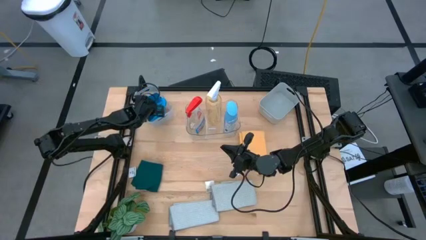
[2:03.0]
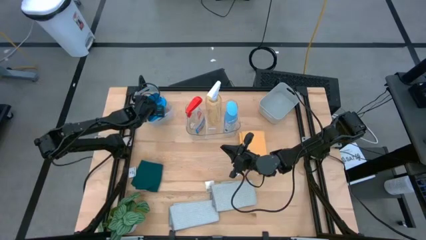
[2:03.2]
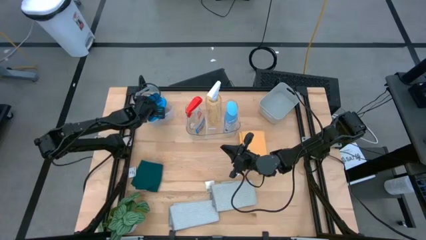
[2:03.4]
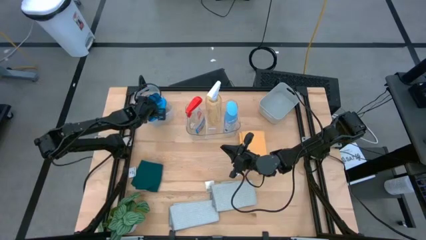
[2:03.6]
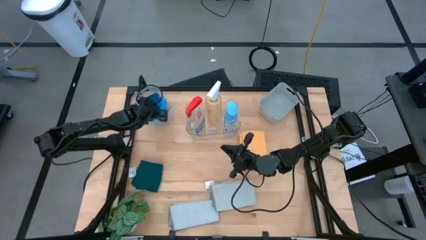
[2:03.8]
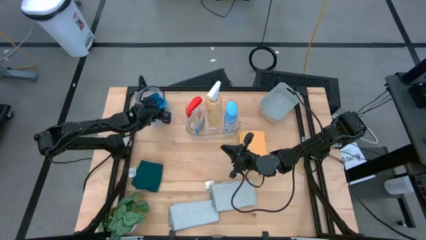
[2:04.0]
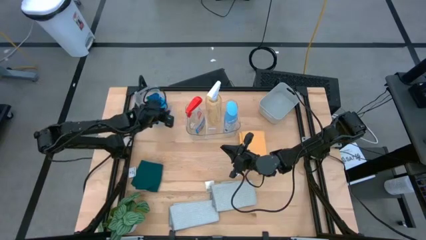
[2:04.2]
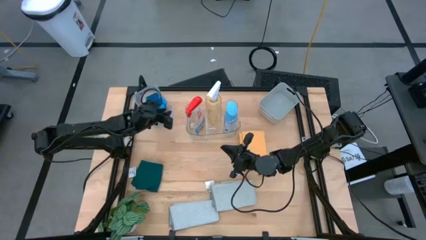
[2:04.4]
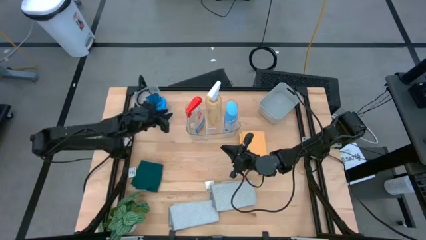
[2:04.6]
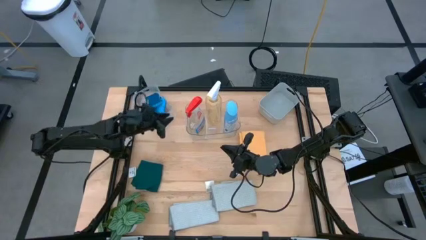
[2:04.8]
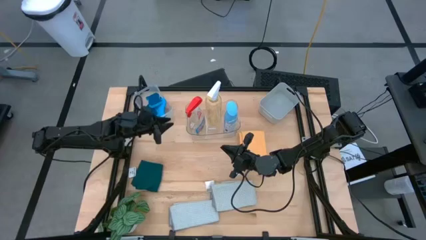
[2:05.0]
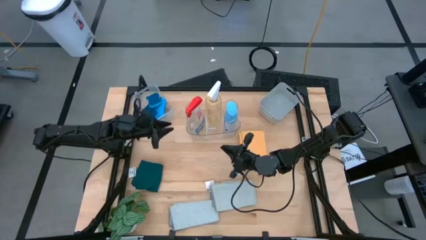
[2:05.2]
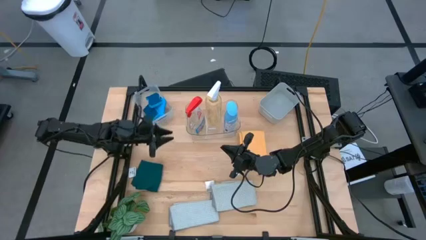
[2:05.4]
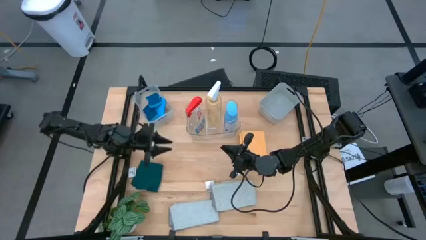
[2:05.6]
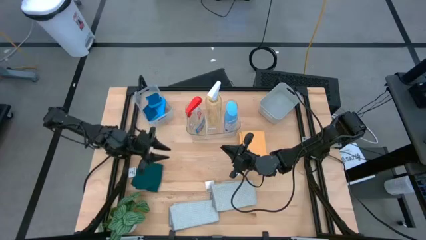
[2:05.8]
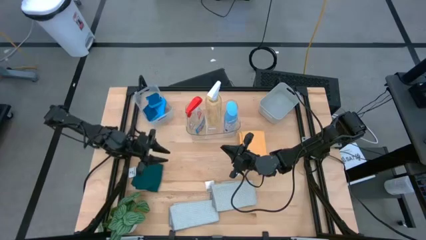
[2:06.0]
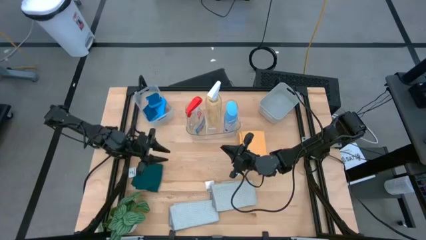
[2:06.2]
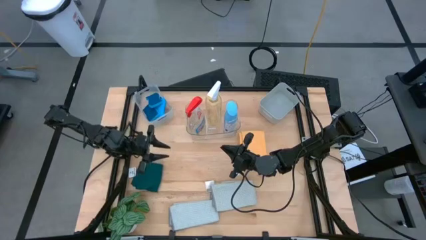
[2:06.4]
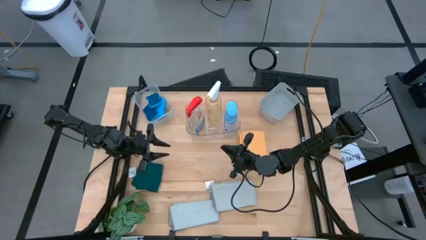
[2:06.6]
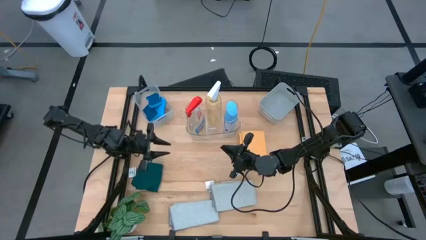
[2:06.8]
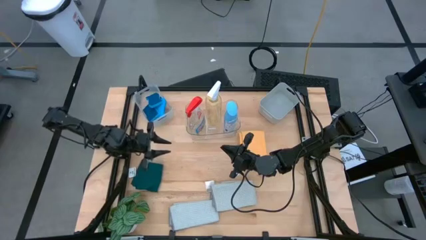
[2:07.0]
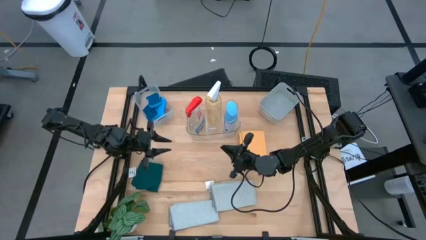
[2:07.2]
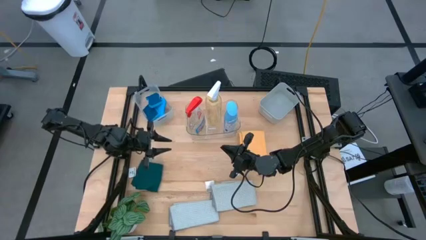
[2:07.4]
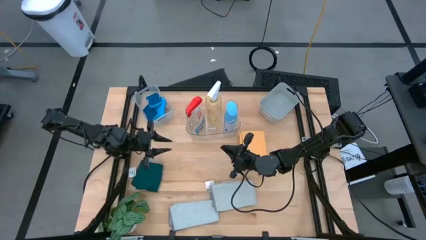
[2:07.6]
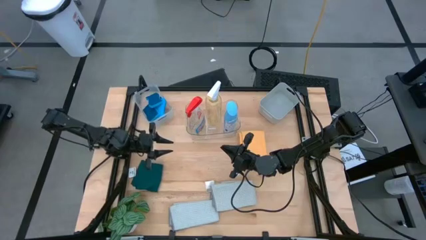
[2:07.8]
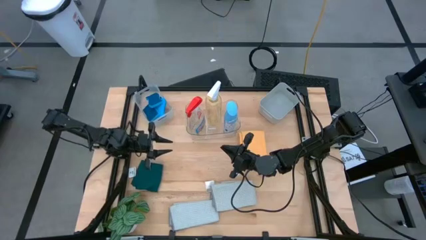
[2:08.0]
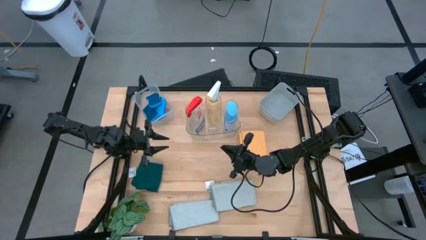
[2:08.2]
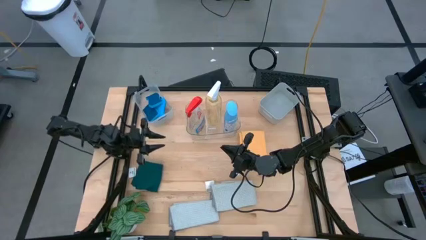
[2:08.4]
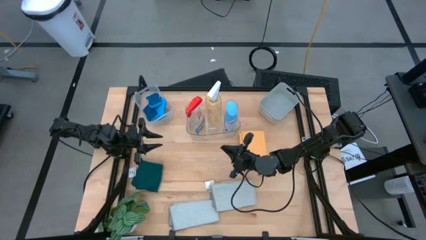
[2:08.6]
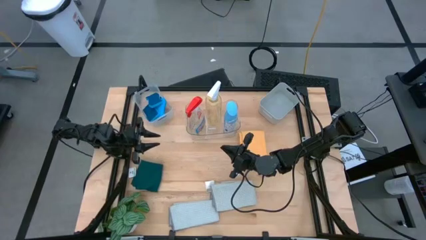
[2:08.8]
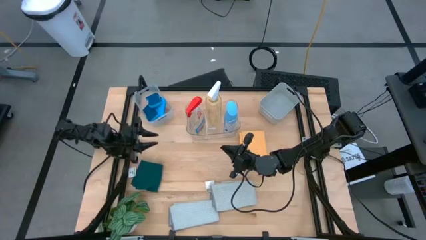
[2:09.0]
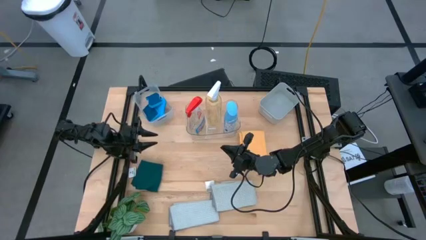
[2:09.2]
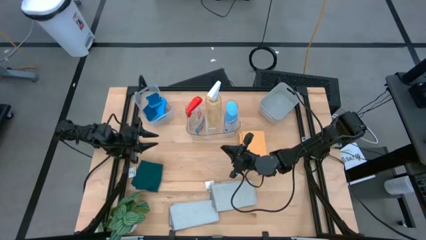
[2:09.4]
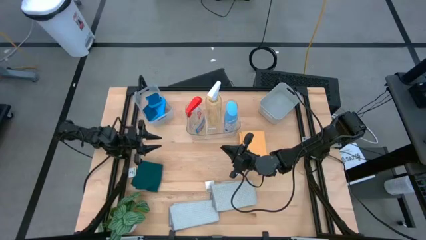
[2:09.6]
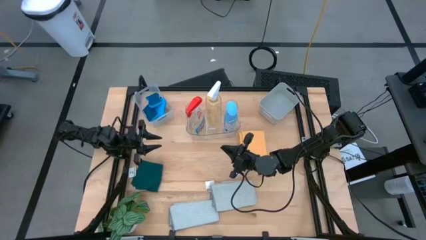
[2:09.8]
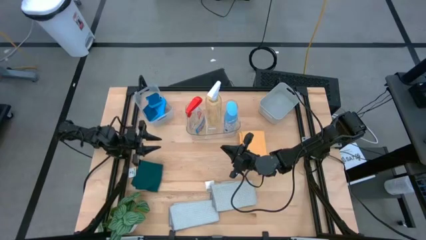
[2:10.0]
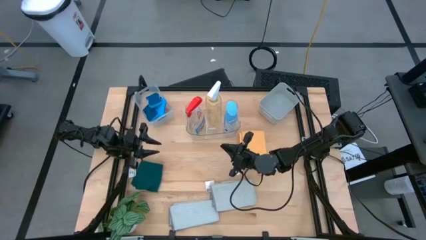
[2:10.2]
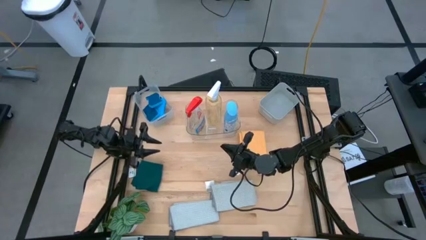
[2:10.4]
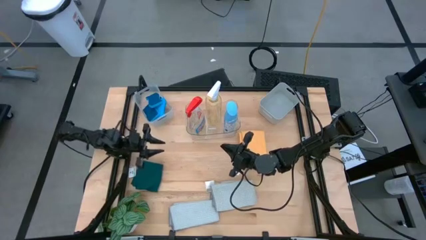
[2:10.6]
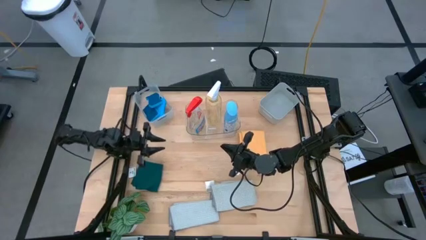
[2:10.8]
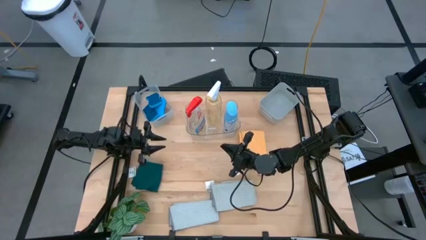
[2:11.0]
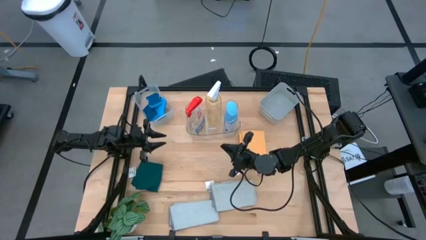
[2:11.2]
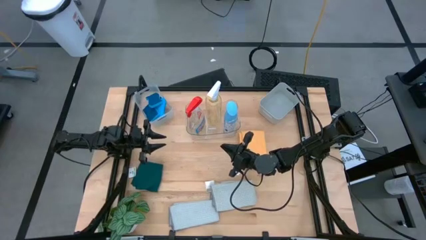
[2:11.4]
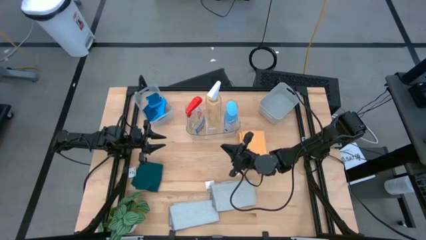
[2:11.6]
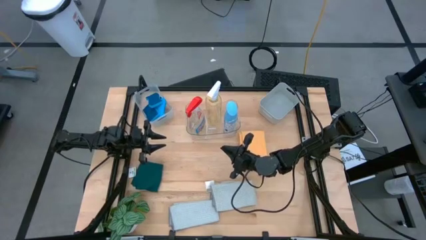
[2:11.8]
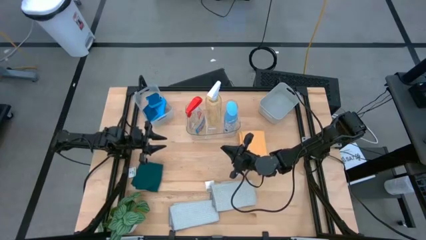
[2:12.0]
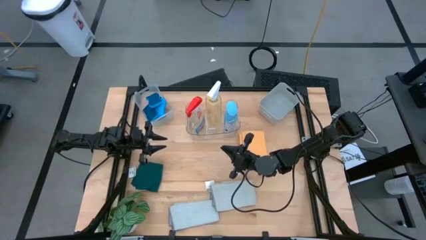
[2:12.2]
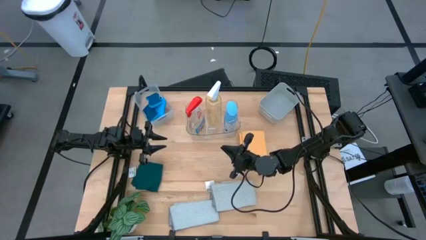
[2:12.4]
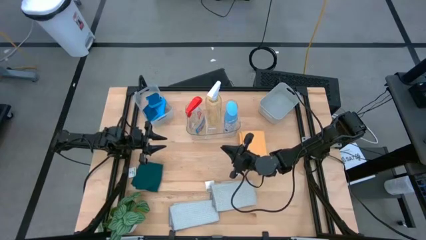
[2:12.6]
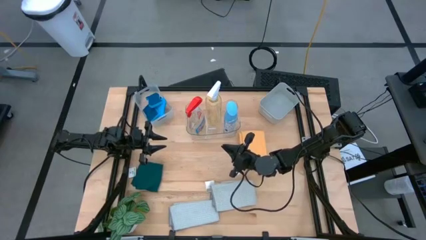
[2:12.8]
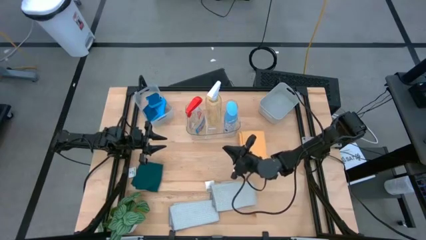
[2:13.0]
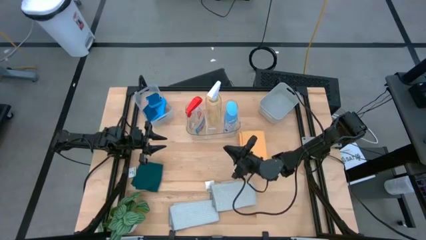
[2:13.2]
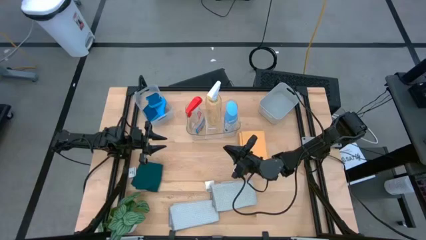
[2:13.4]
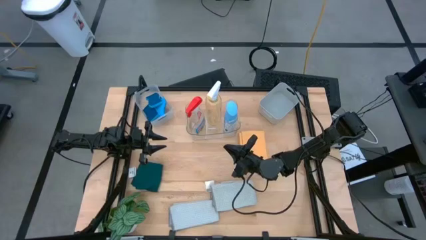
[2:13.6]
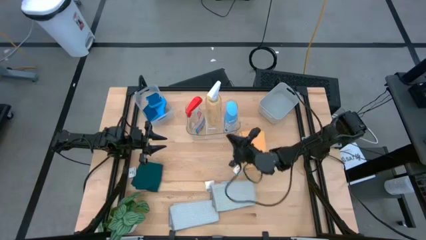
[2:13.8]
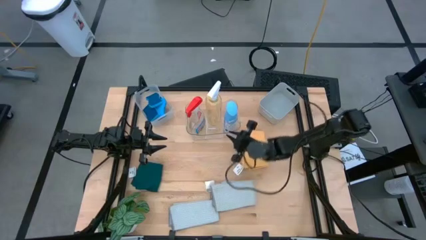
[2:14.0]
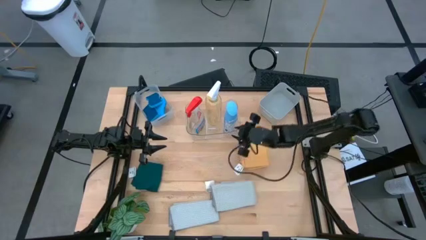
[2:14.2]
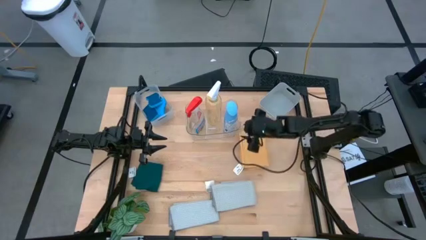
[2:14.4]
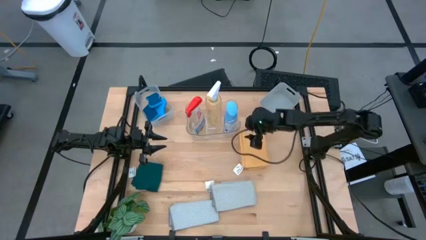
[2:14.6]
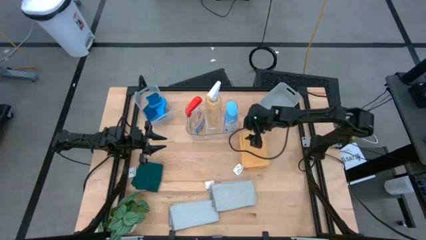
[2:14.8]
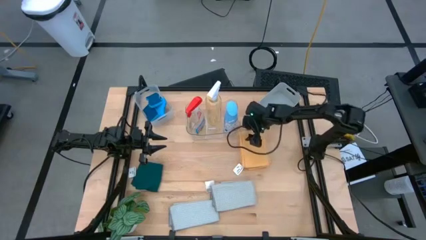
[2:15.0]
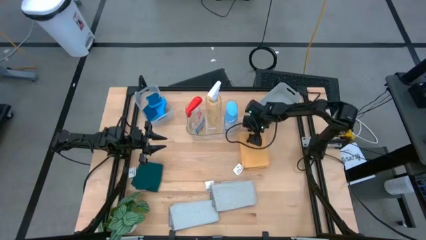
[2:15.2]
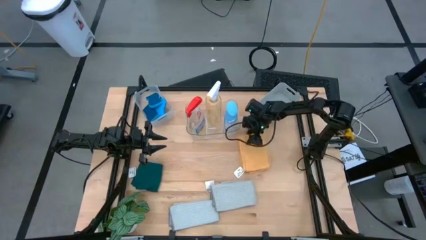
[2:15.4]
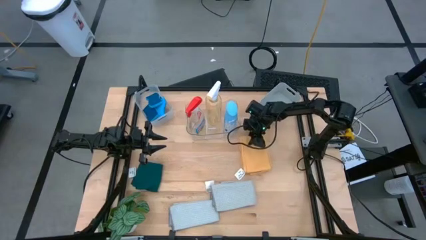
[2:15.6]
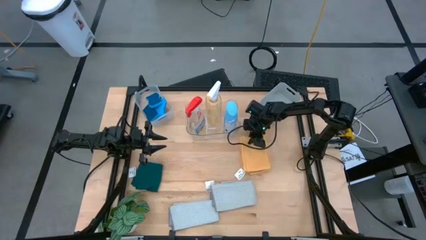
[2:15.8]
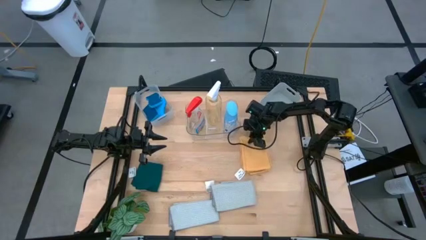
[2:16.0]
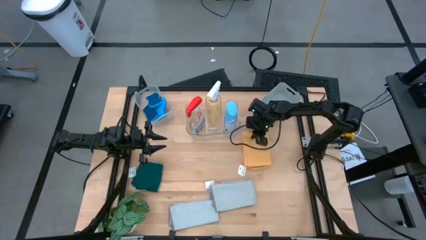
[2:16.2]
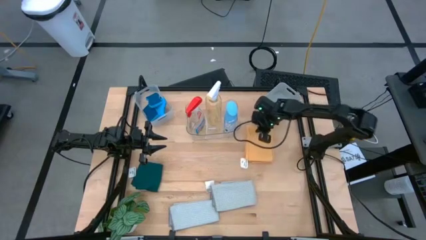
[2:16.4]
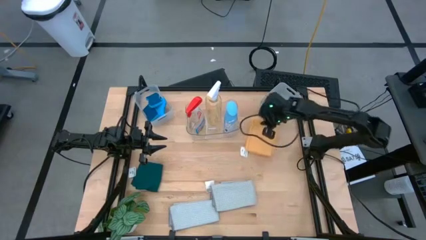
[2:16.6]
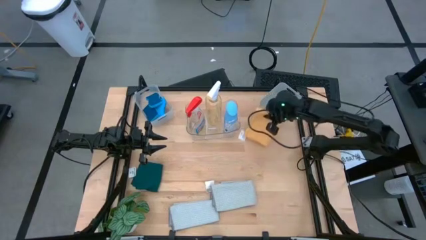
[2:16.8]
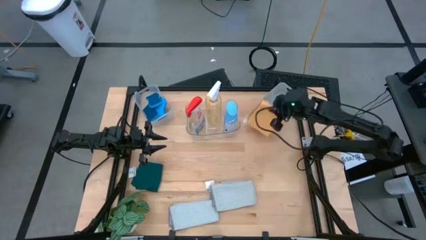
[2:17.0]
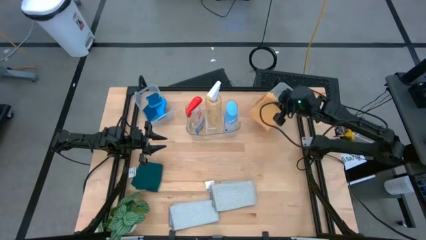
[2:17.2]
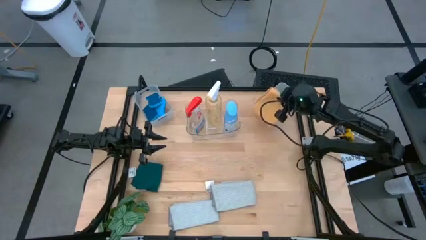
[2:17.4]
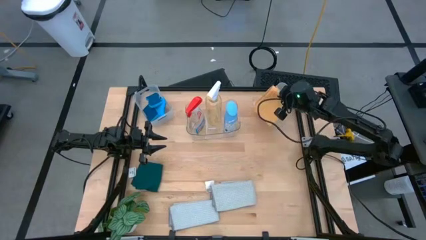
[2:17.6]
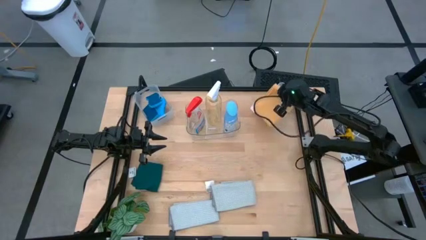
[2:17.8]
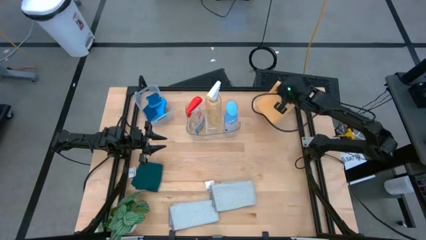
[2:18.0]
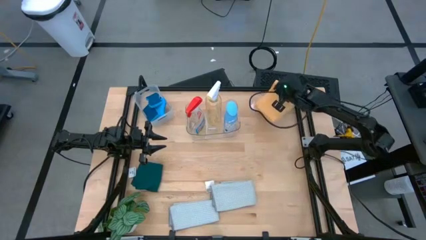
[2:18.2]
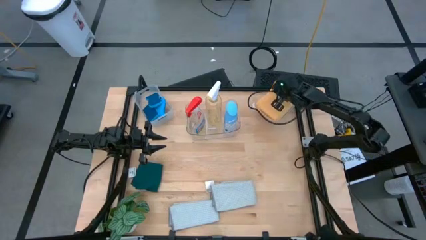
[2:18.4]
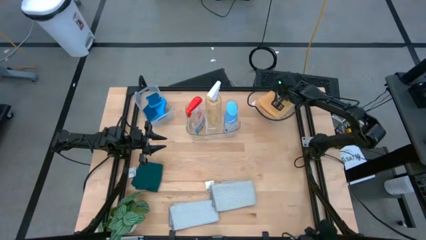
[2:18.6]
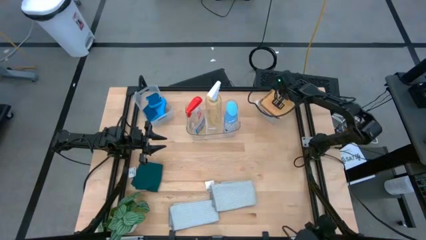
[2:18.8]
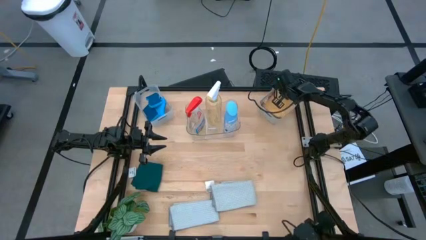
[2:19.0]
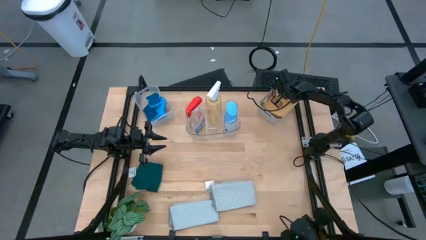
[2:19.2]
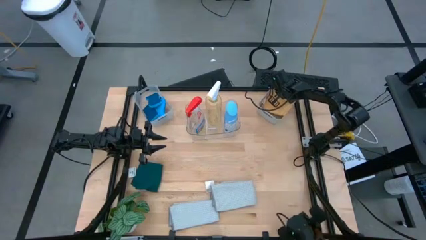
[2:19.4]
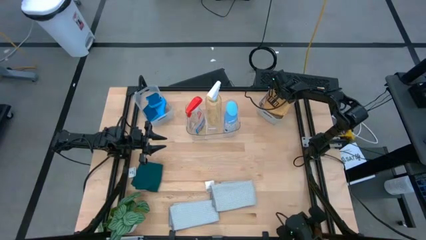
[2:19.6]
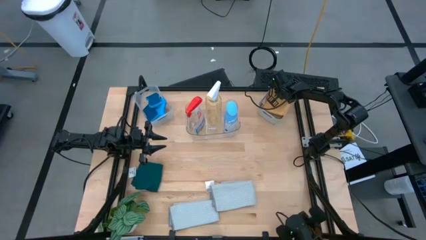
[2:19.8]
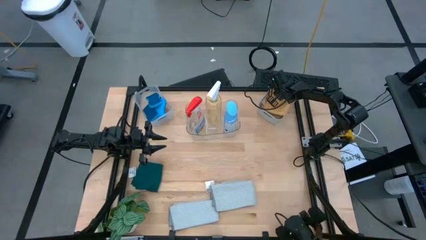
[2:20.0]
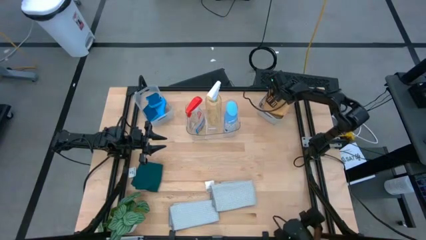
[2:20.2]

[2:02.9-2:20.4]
Task: Pick & Place Kitchen Items
Put the yellow microfiber towel into the gray bin
